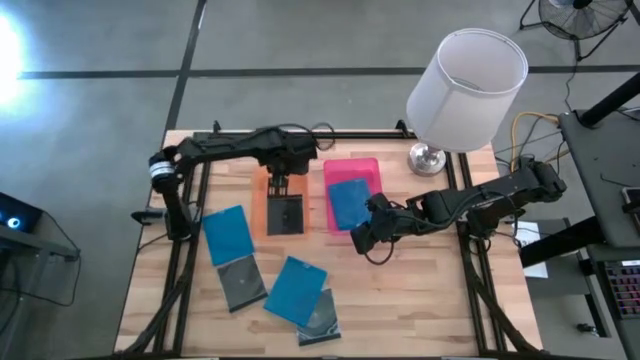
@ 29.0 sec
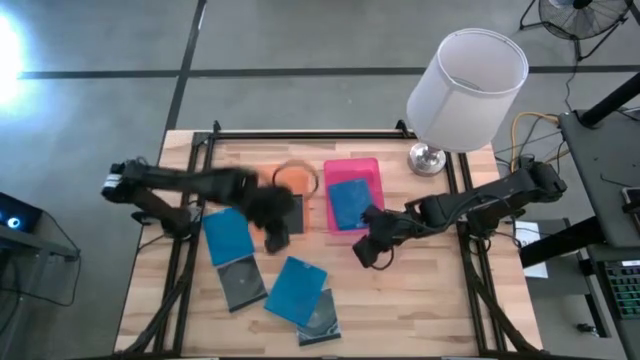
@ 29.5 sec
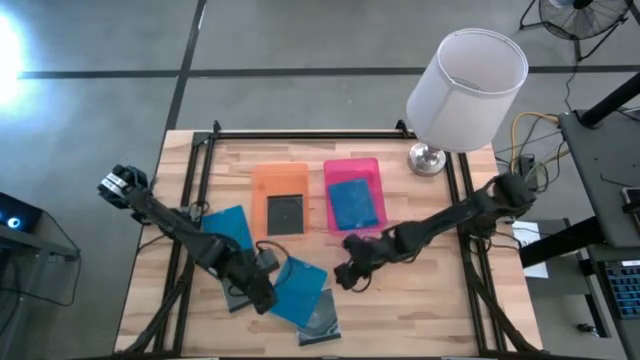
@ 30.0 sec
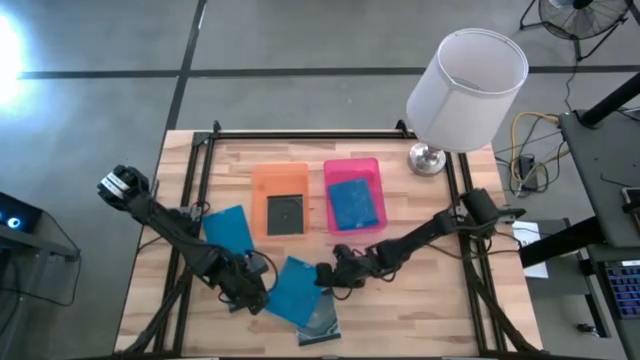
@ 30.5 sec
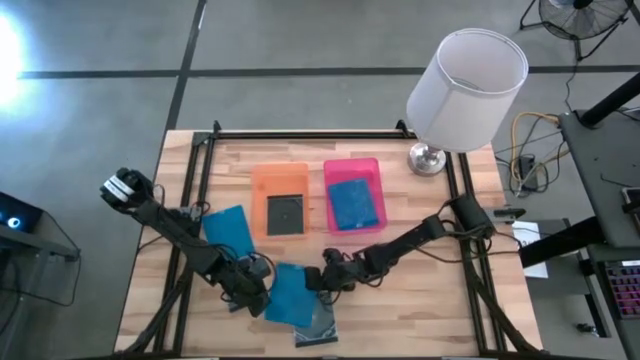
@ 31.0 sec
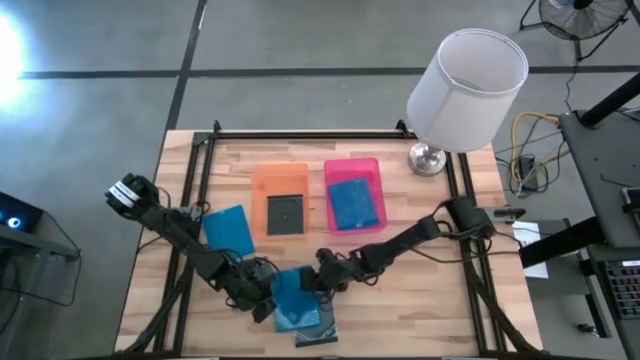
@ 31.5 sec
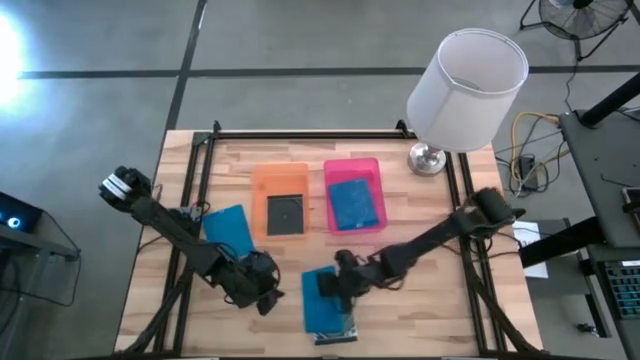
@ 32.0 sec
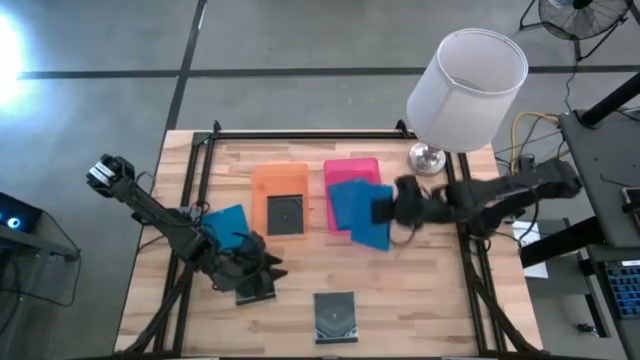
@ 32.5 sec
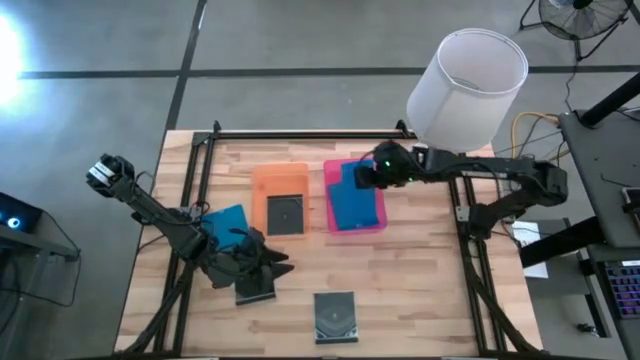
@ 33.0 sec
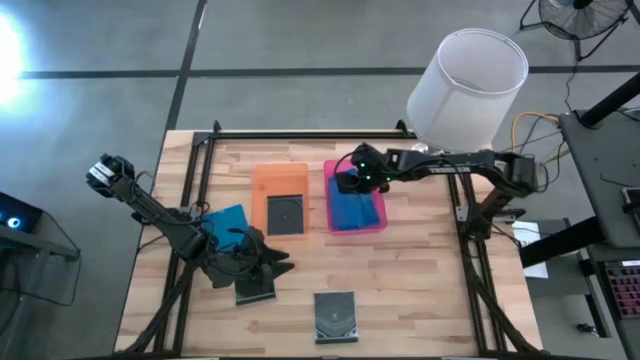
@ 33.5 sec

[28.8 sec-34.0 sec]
Task: Pick & place jewel cases by type
Put the bottom blue cd case into the pink bin

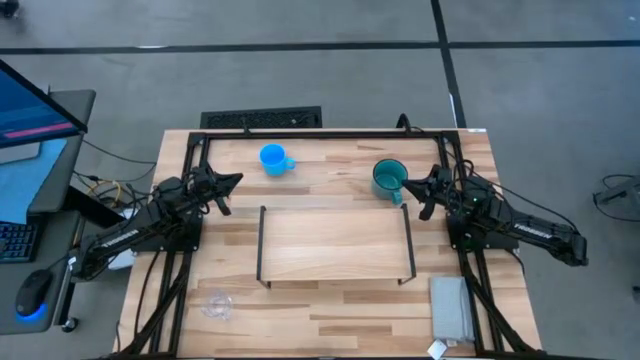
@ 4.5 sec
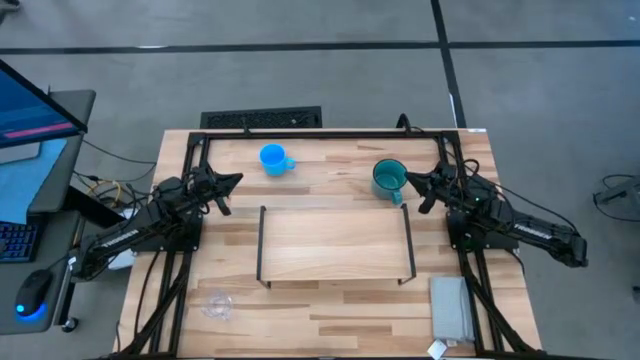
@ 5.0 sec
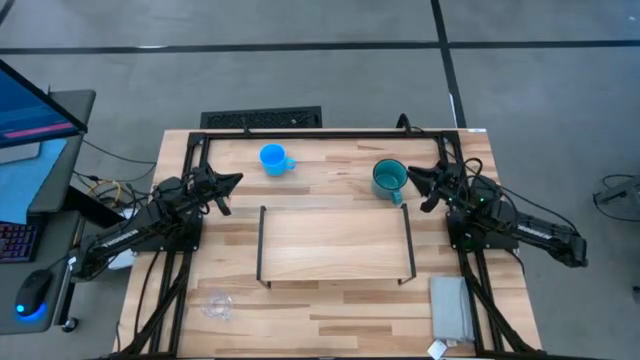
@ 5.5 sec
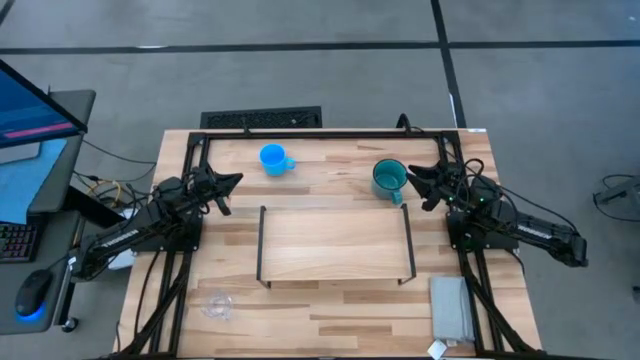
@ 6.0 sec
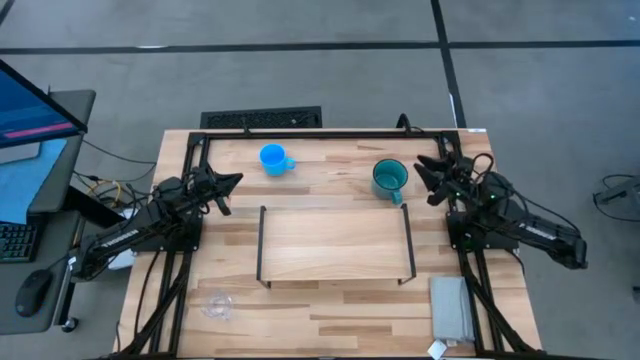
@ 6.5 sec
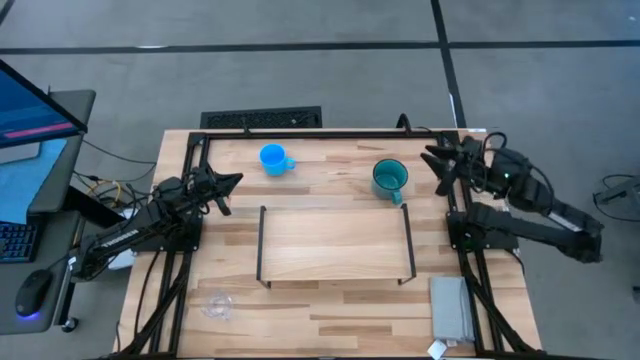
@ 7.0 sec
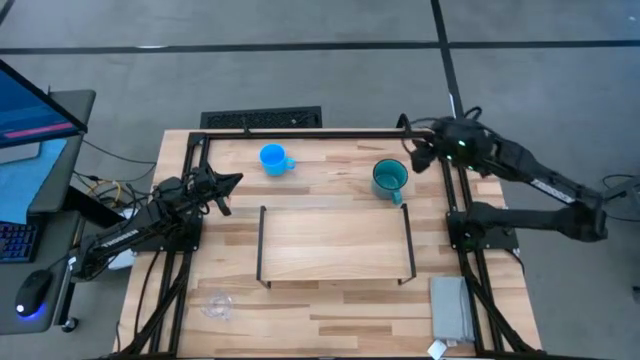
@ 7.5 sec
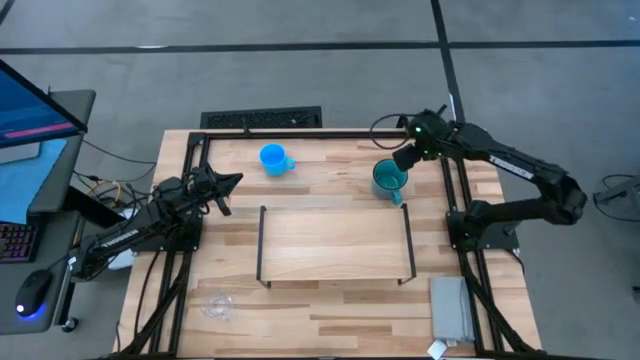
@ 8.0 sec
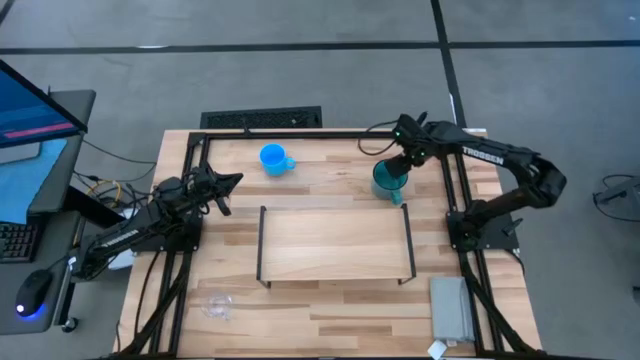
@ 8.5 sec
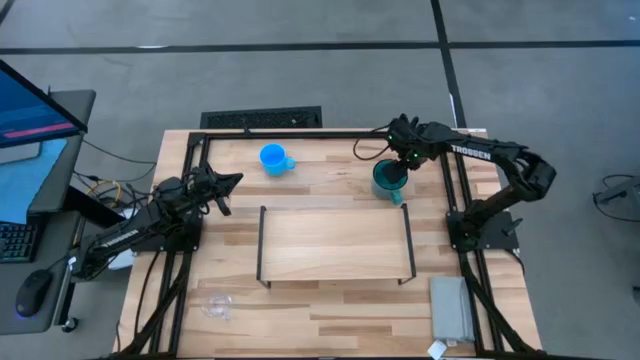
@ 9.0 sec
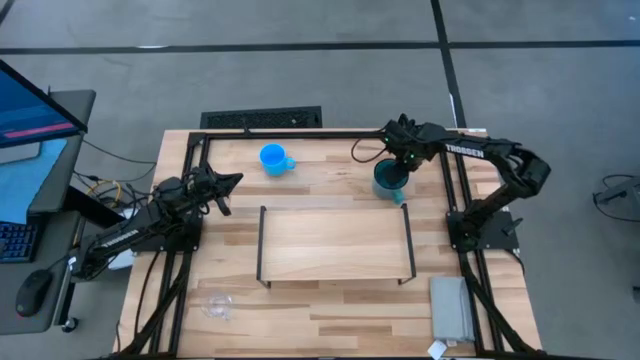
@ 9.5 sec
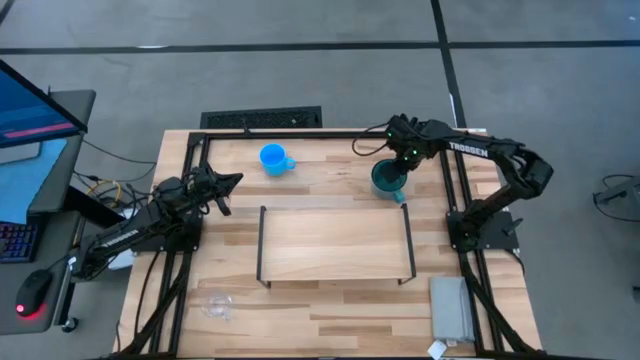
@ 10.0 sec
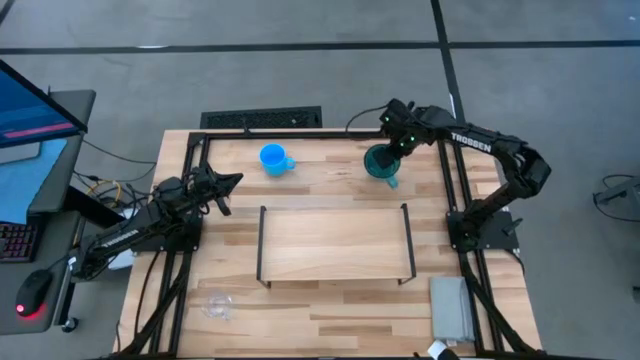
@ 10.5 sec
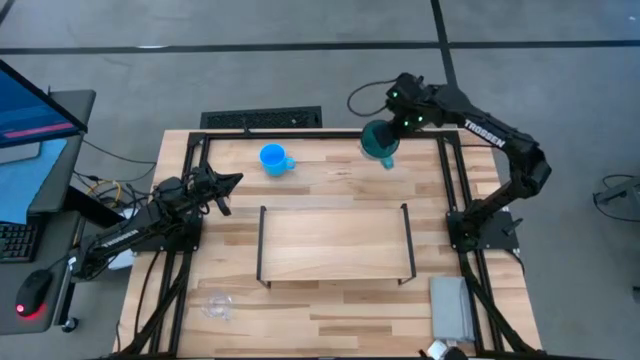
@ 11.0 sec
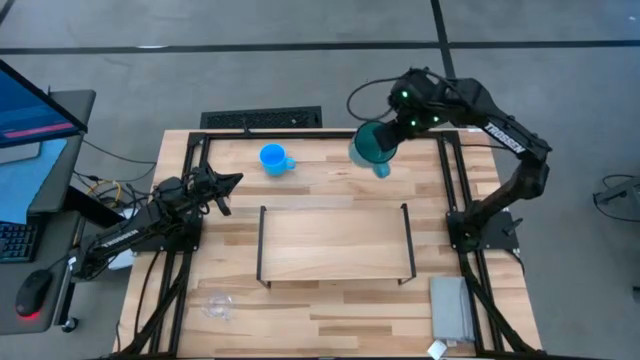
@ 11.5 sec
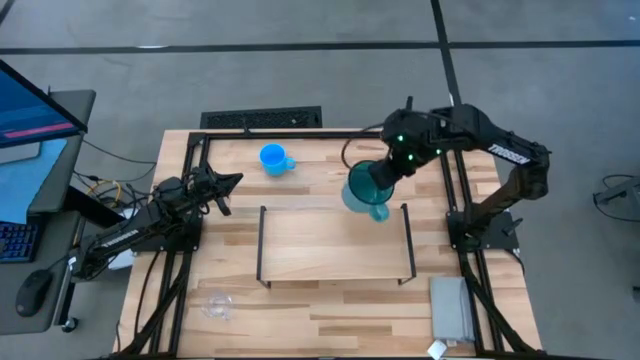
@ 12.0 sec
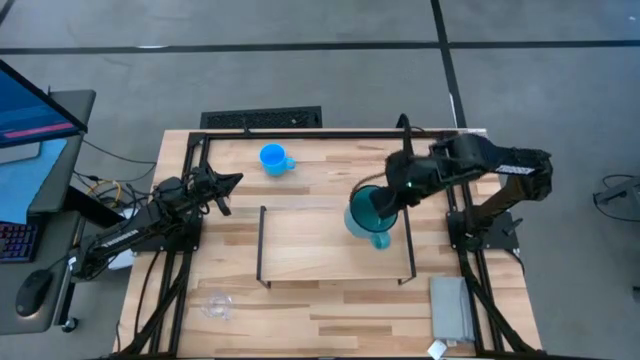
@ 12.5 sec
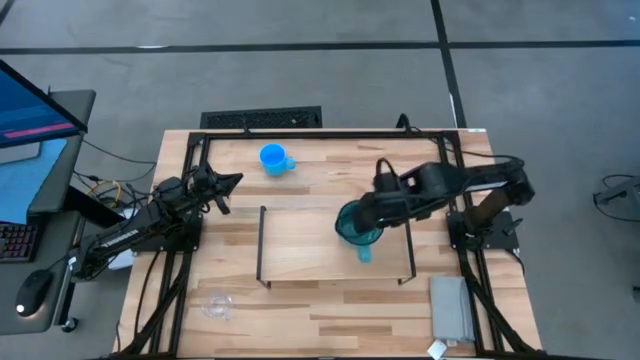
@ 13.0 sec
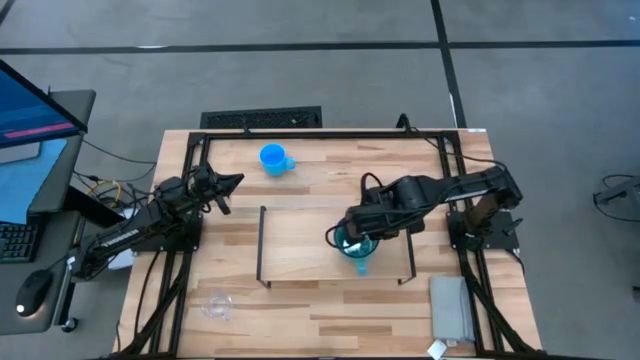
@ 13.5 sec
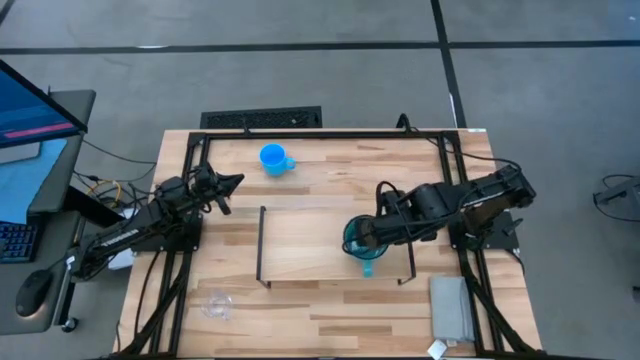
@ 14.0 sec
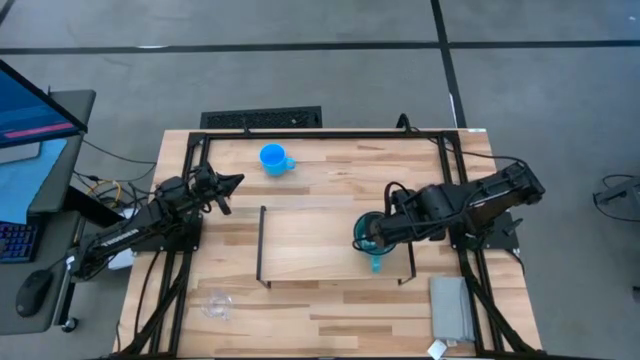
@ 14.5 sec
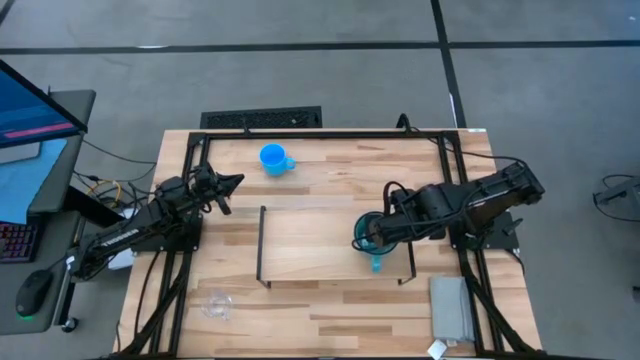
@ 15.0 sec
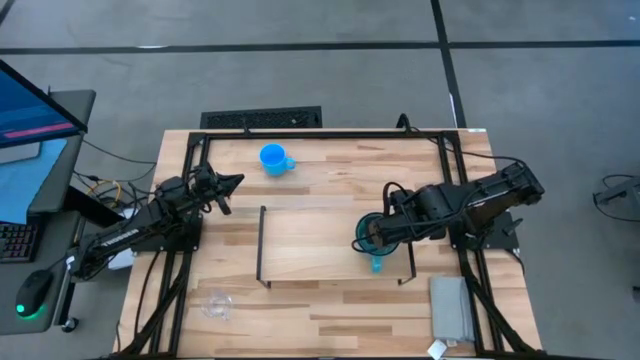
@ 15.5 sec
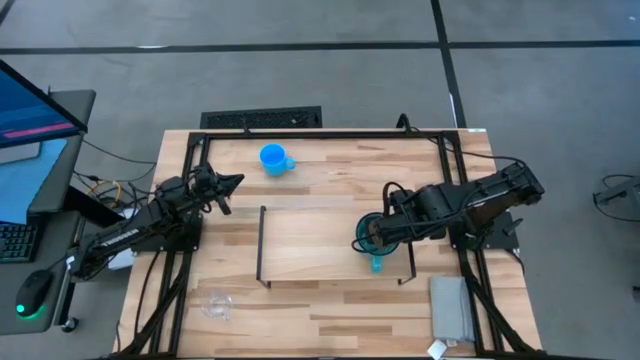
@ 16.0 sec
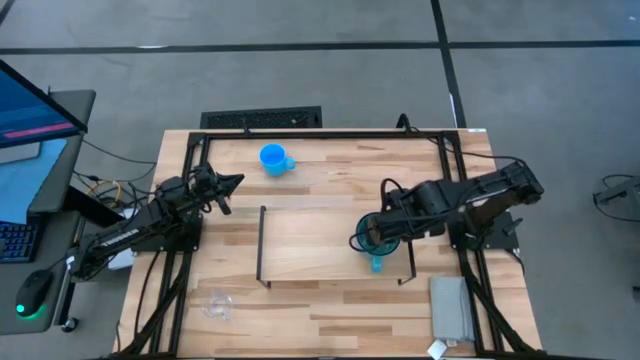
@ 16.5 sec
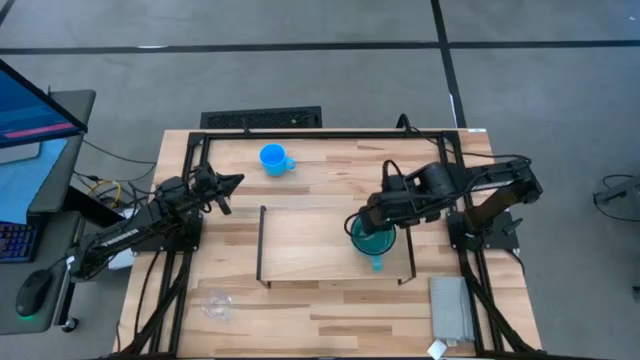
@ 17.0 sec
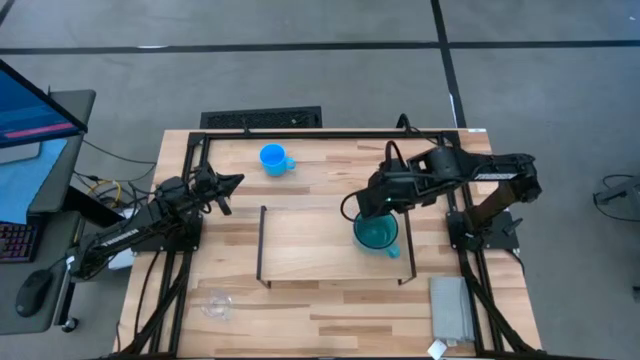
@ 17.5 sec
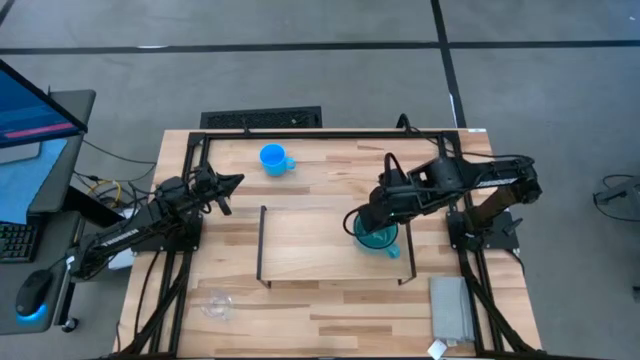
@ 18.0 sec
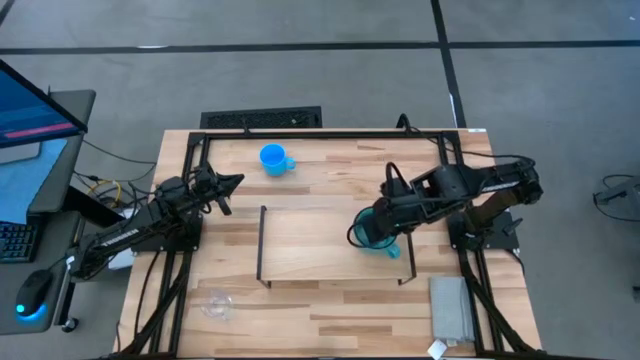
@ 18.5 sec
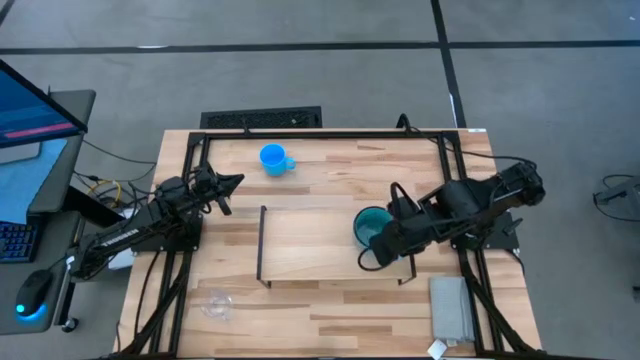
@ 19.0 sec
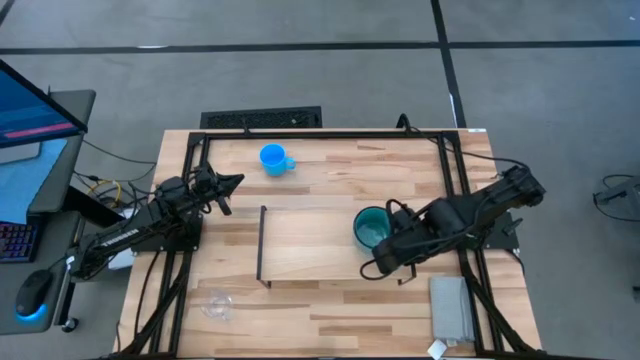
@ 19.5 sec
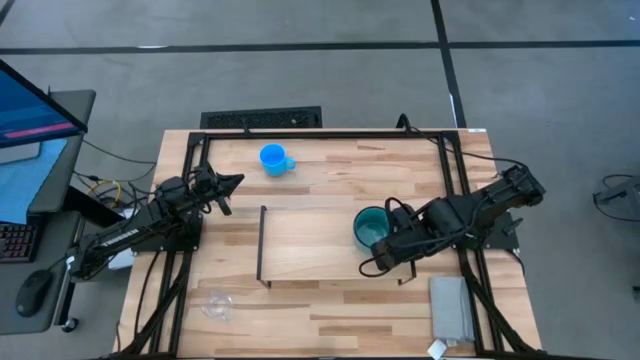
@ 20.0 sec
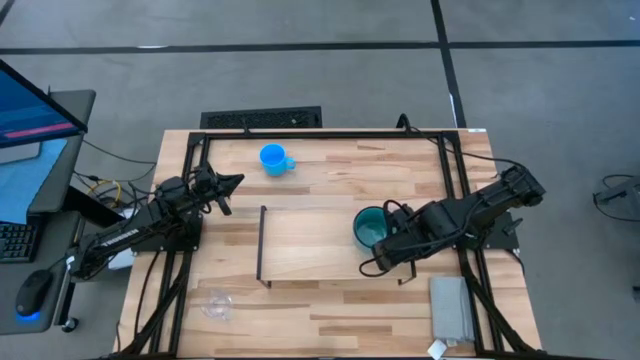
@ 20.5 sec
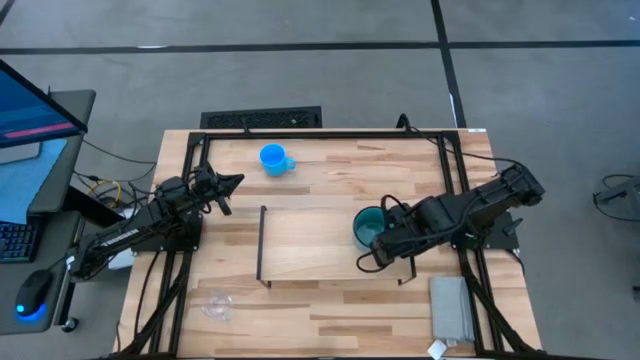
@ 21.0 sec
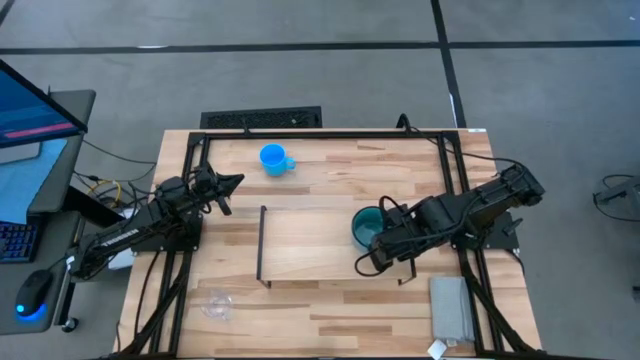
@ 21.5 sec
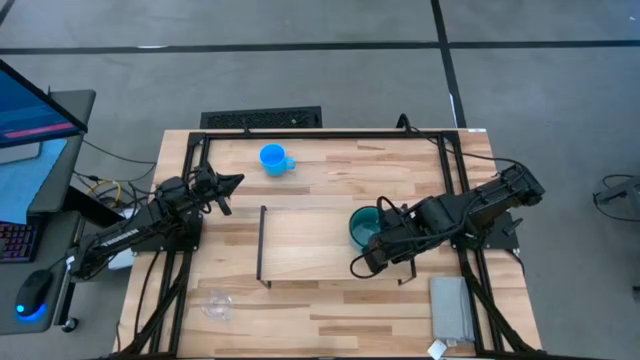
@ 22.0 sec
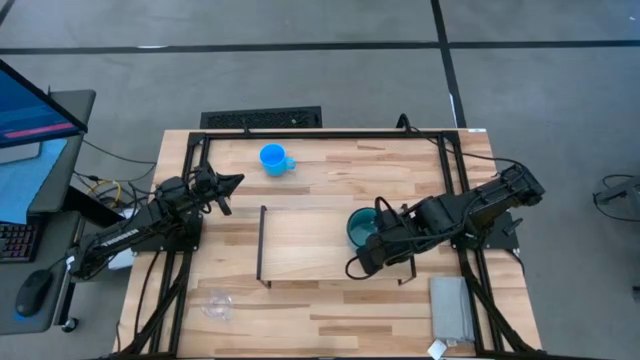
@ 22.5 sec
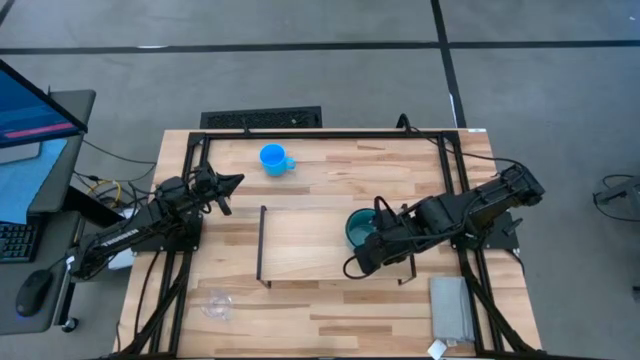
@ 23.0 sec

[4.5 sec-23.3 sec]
Task: Stack small to large cups/mugs on shelf
Put the green mug on the shelf
